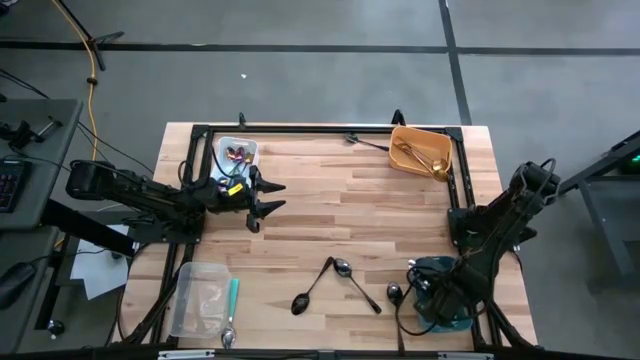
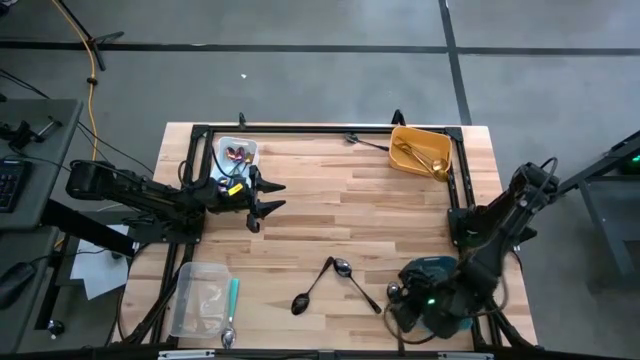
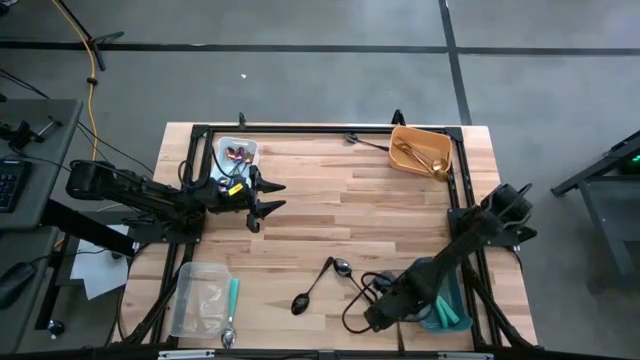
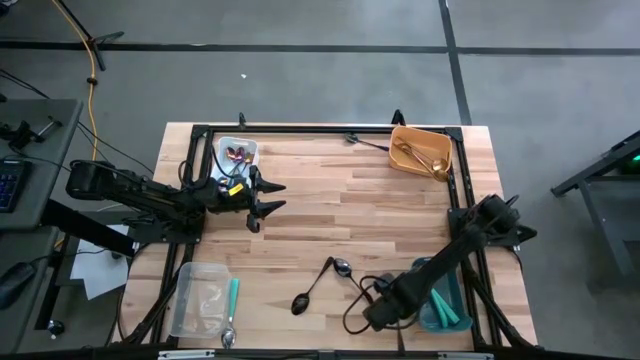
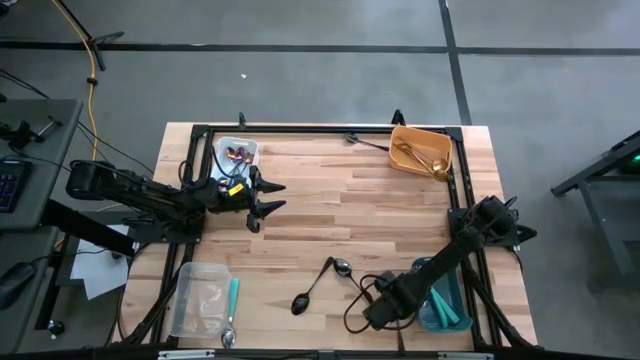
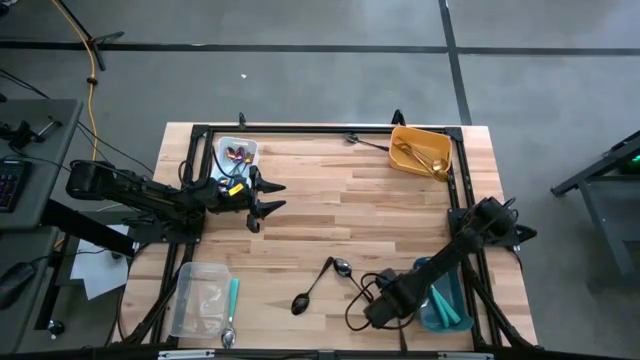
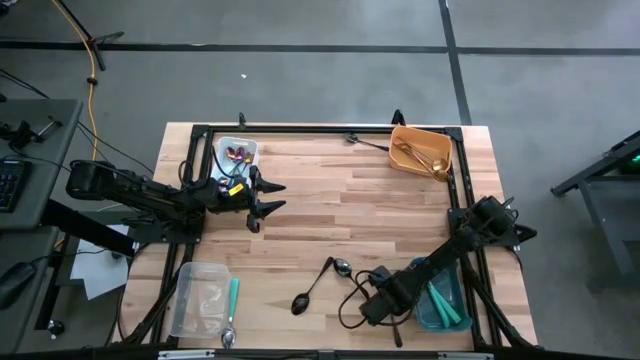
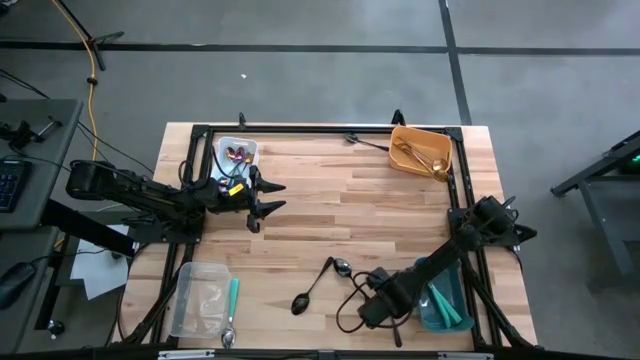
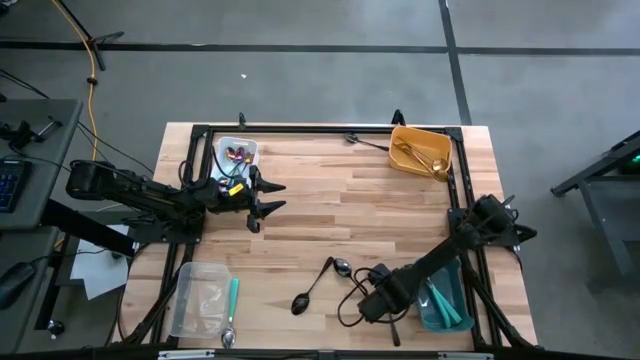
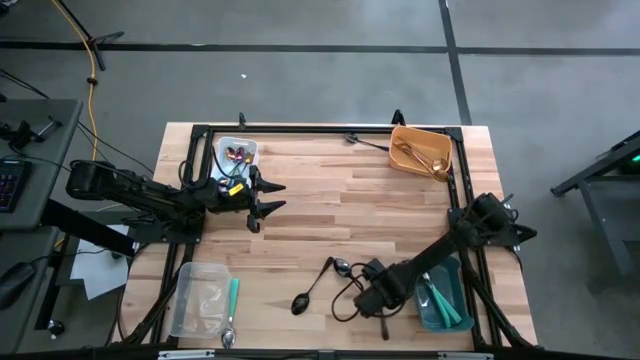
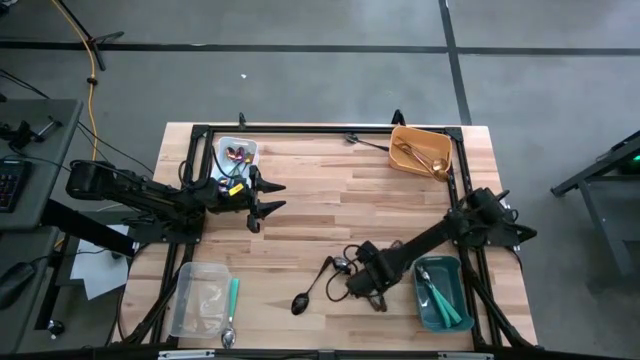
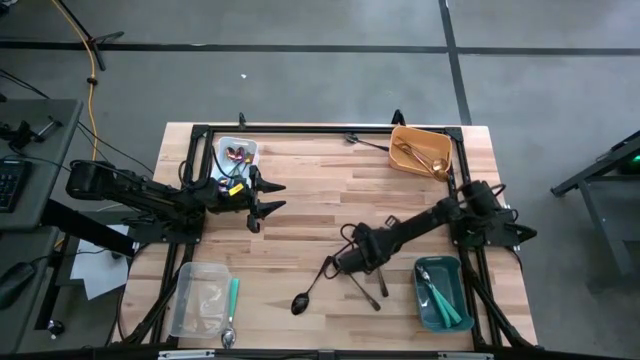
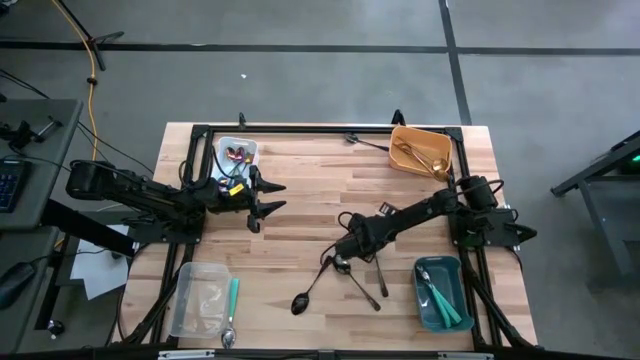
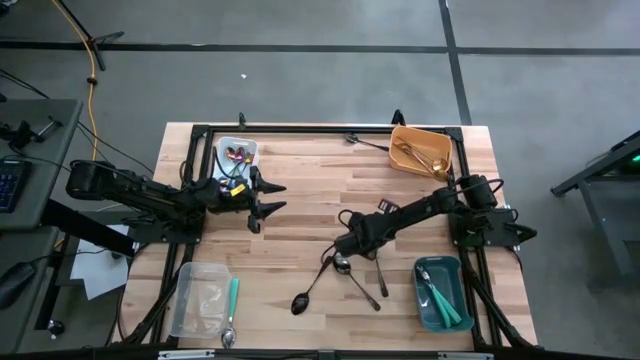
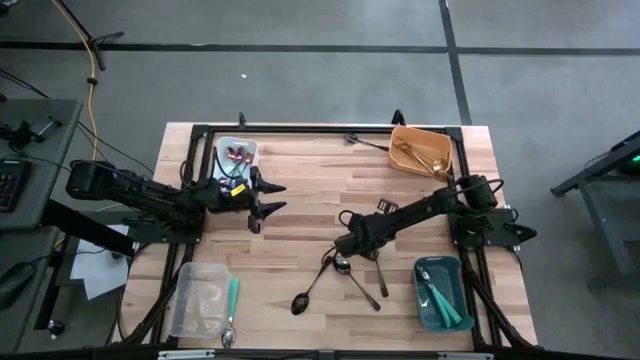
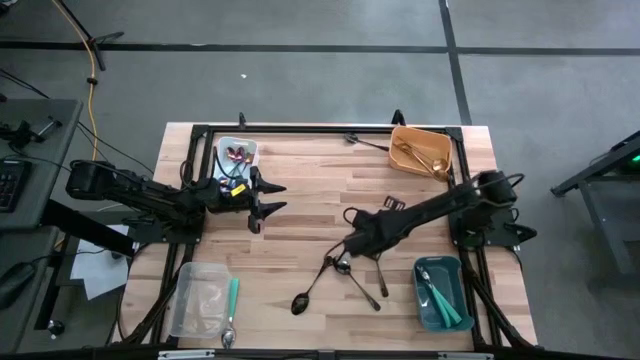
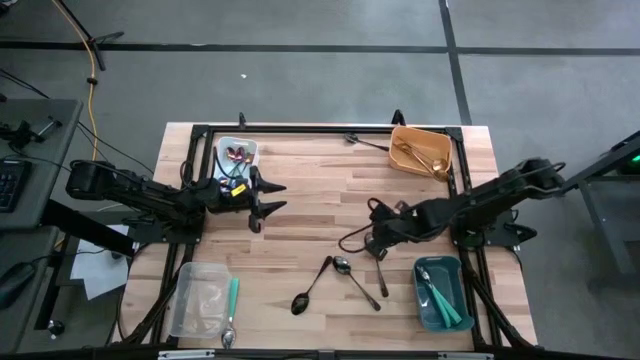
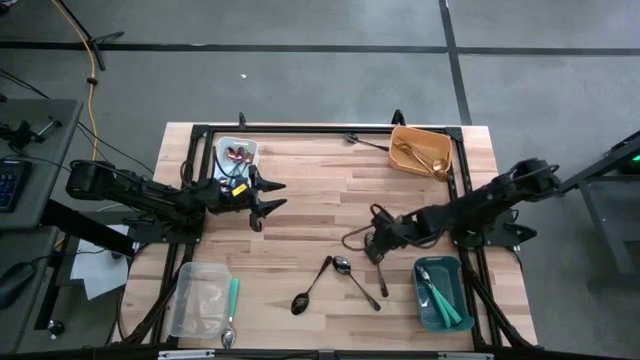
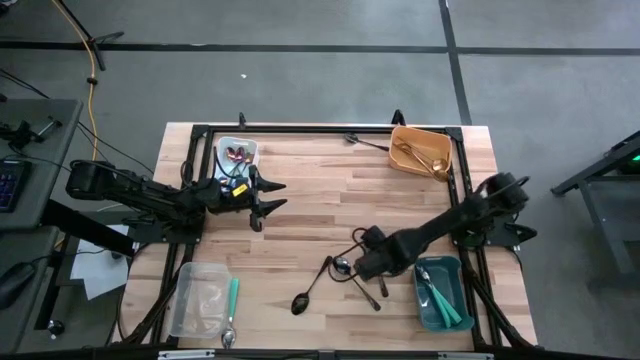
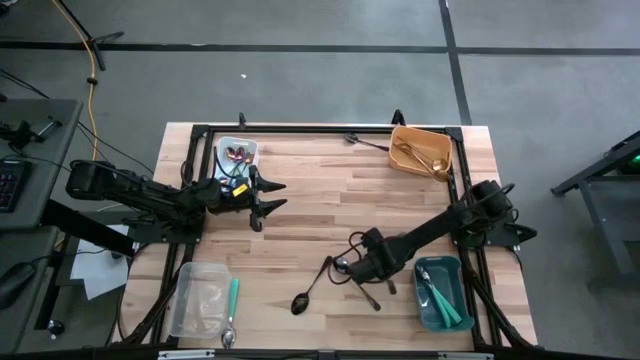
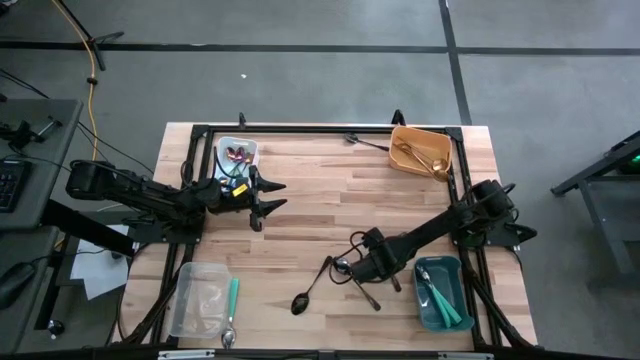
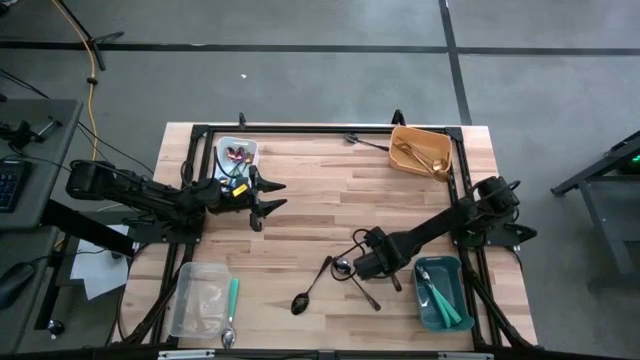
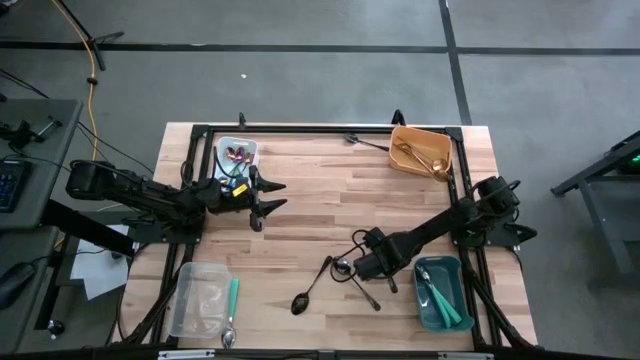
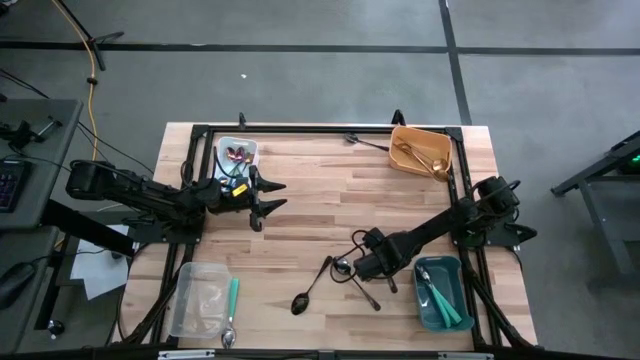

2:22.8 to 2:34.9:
Task: Sort silverware by color (type)
Put the black spoon into the transparent bin

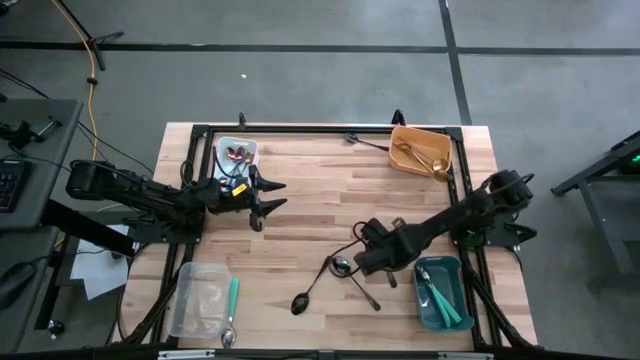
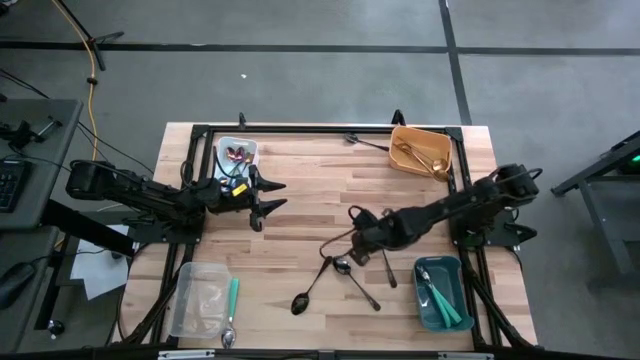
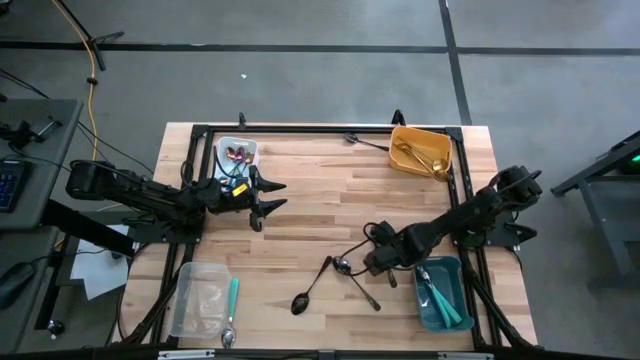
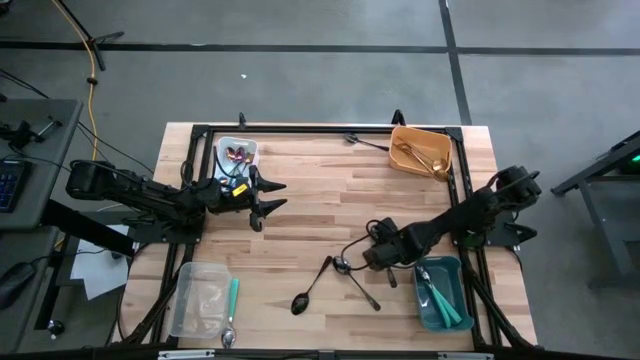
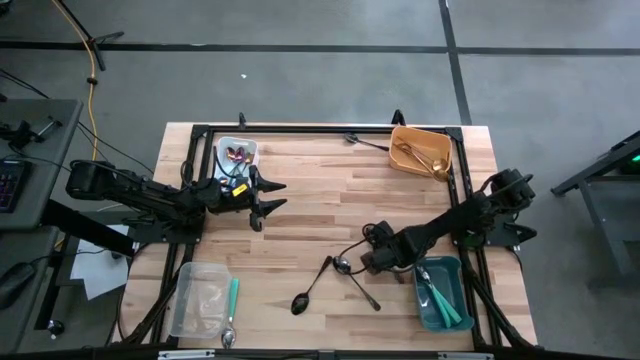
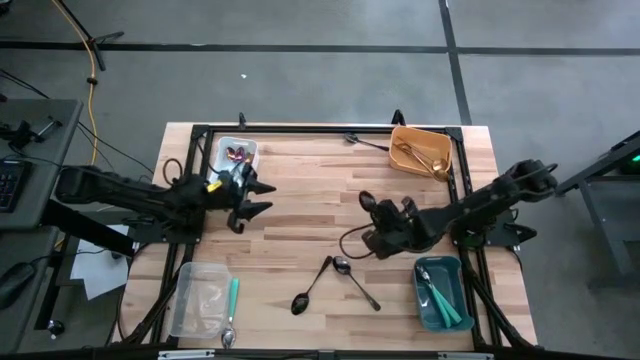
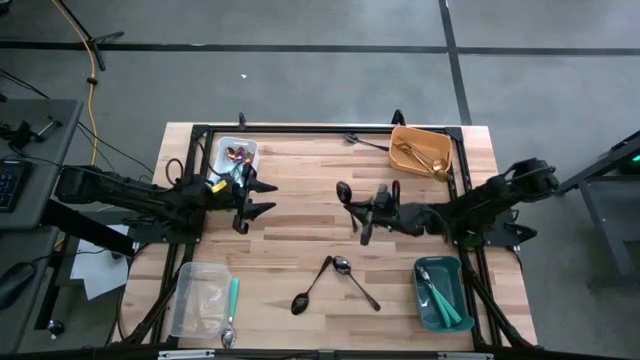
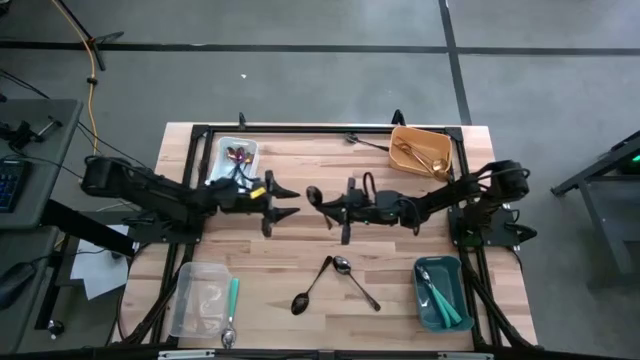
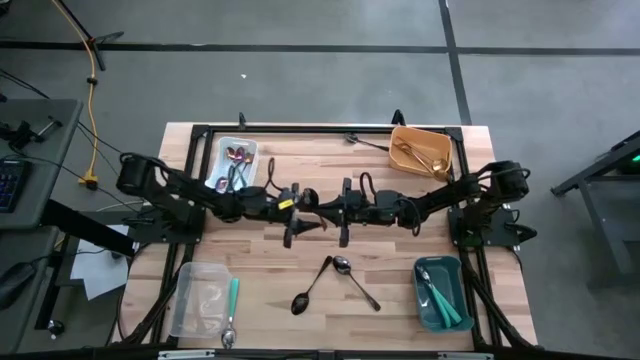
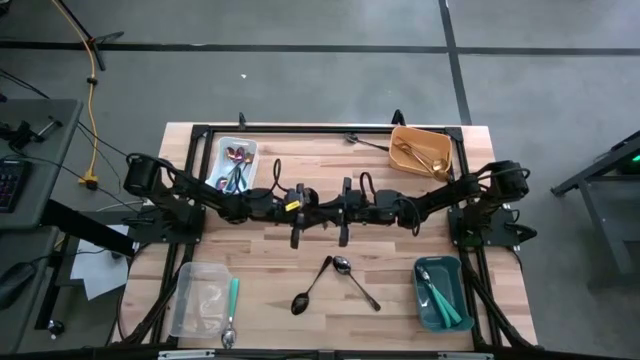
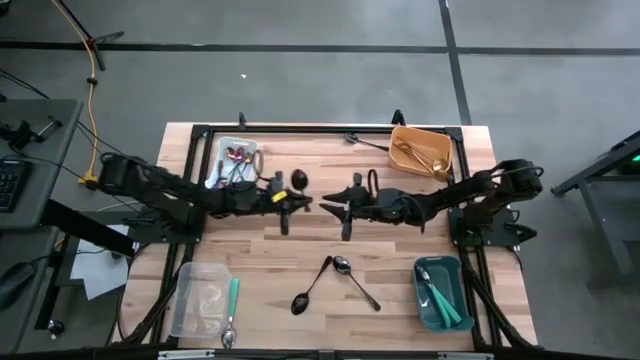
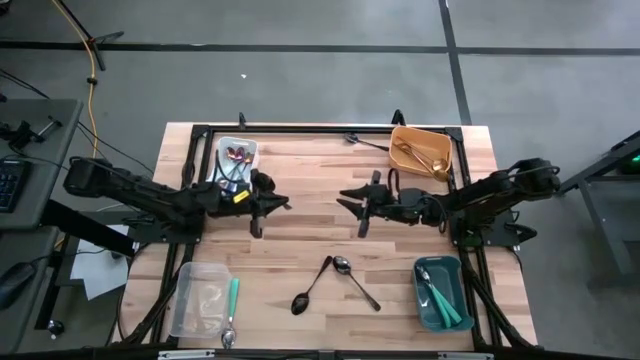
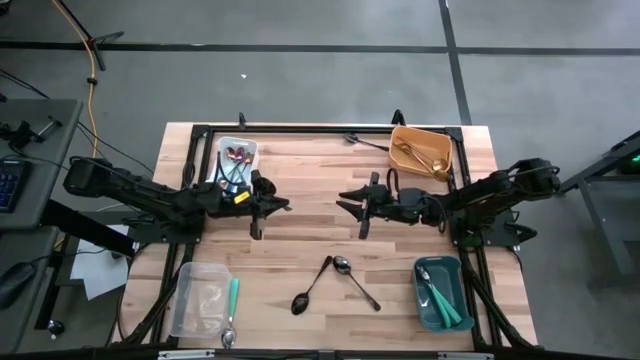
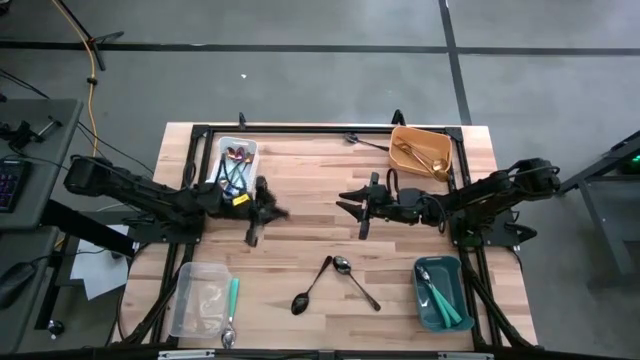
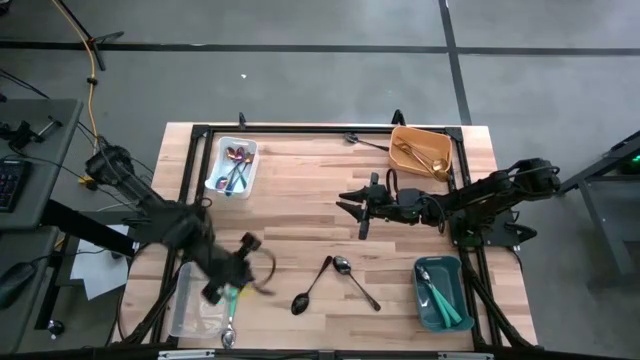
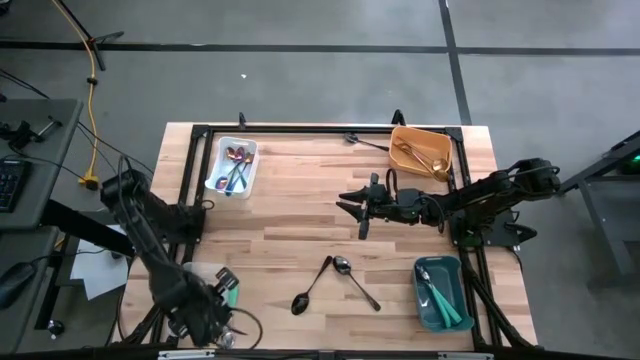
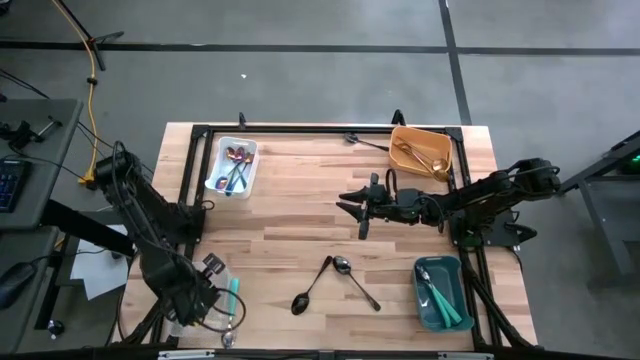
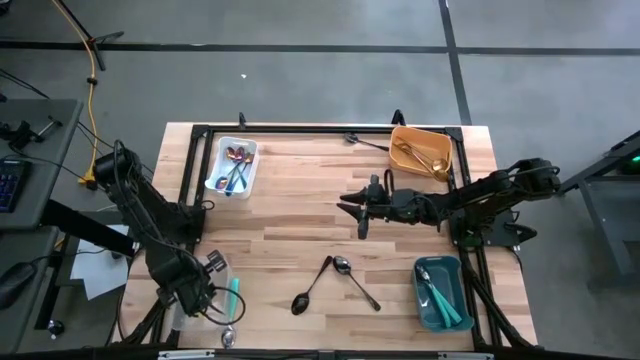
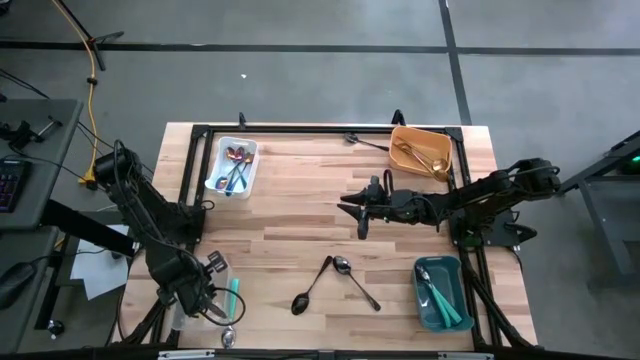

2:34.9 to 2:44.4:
Put the black spoon into the transparent bin
